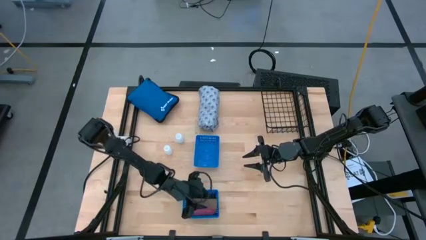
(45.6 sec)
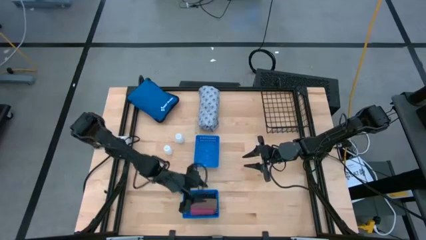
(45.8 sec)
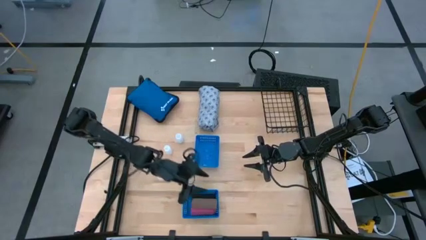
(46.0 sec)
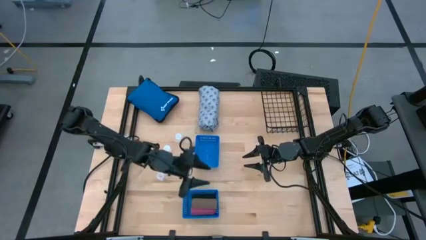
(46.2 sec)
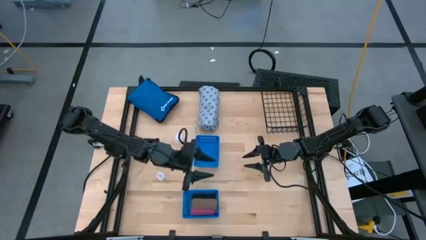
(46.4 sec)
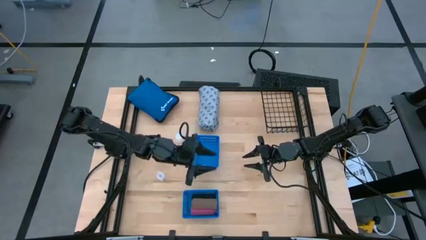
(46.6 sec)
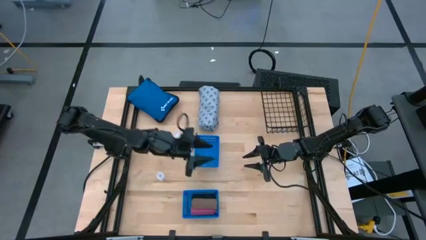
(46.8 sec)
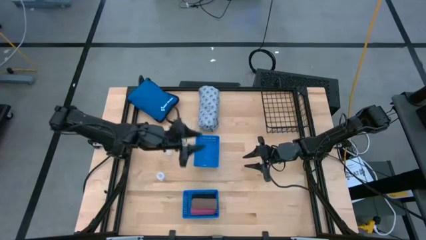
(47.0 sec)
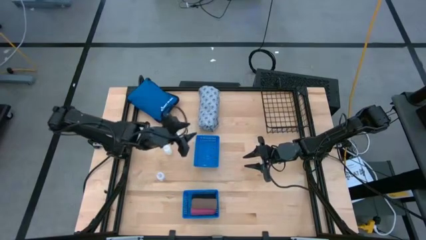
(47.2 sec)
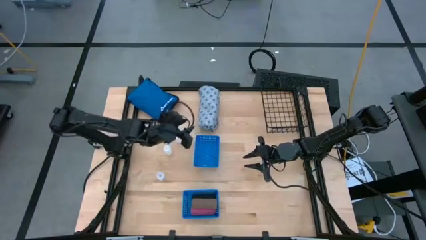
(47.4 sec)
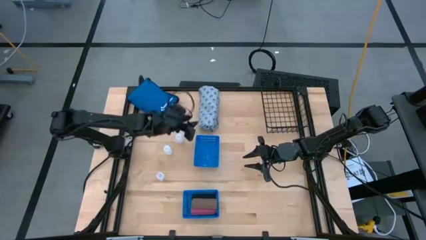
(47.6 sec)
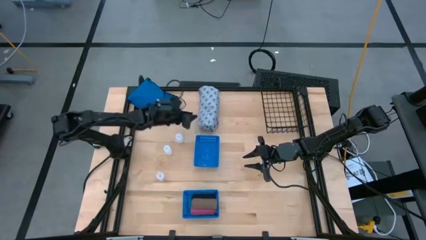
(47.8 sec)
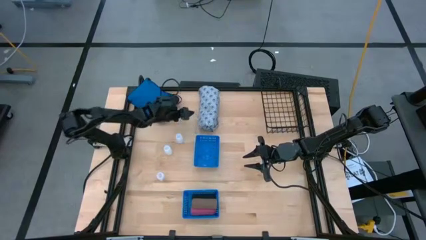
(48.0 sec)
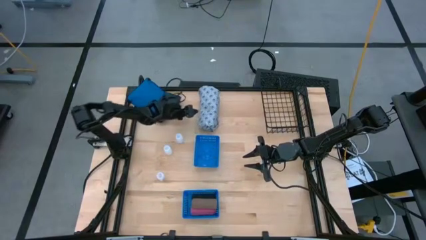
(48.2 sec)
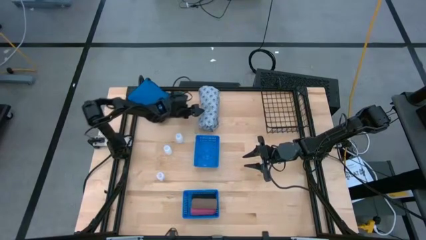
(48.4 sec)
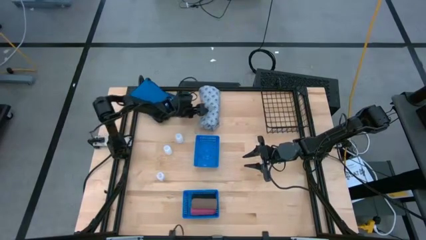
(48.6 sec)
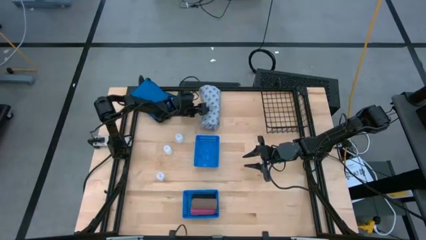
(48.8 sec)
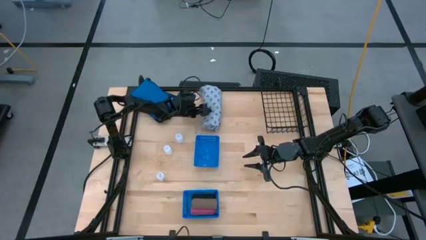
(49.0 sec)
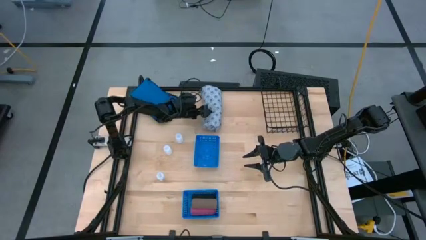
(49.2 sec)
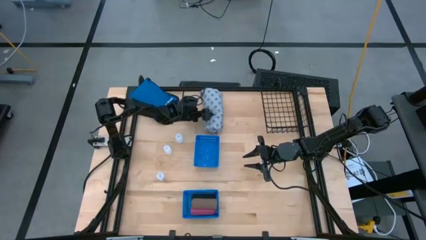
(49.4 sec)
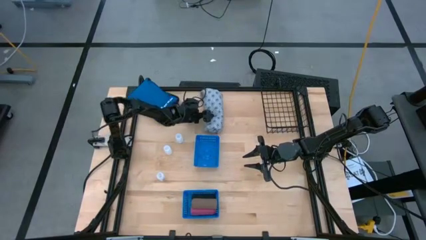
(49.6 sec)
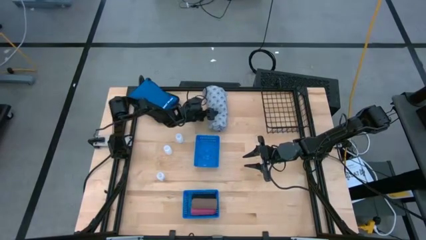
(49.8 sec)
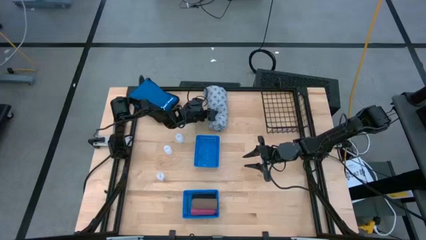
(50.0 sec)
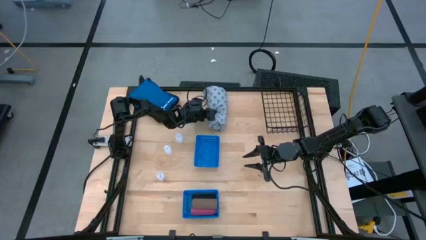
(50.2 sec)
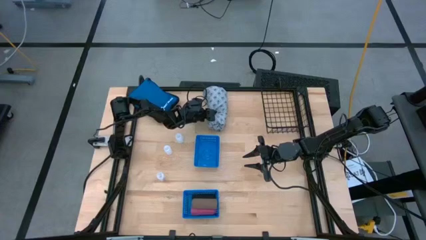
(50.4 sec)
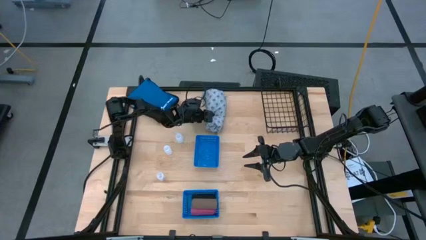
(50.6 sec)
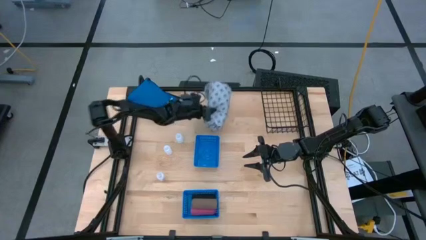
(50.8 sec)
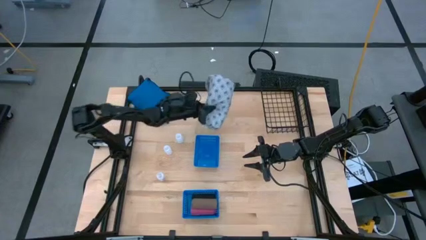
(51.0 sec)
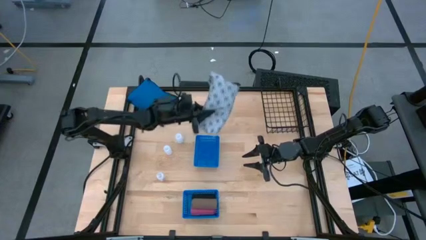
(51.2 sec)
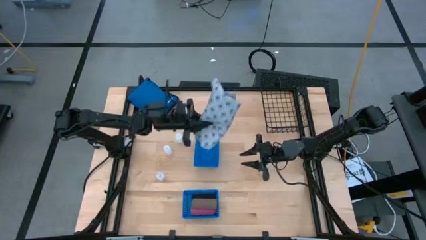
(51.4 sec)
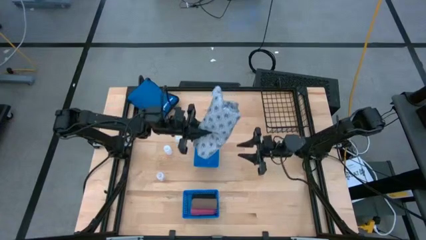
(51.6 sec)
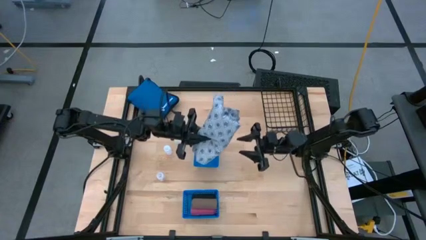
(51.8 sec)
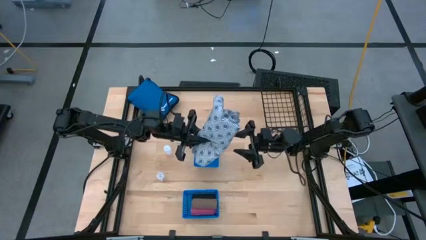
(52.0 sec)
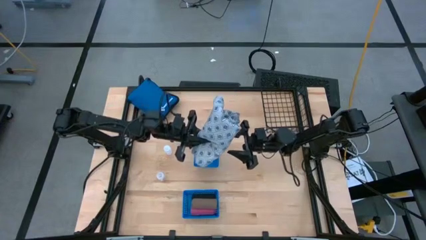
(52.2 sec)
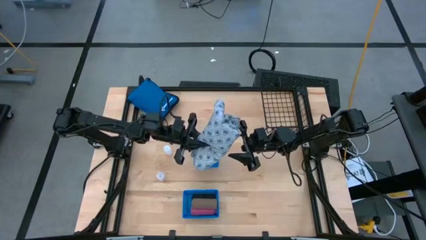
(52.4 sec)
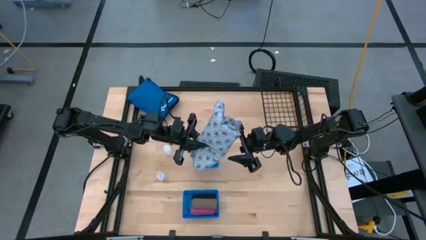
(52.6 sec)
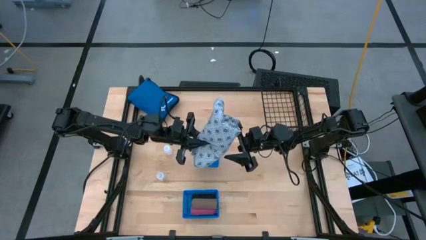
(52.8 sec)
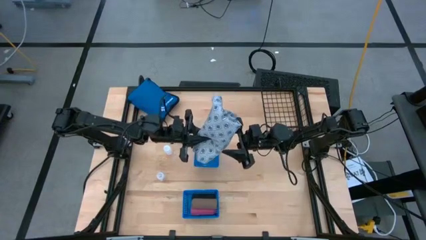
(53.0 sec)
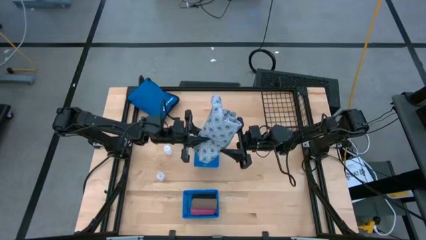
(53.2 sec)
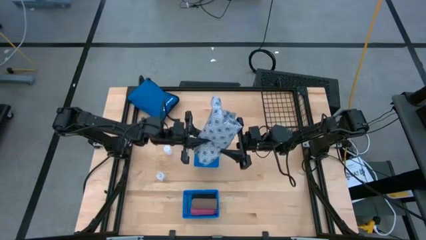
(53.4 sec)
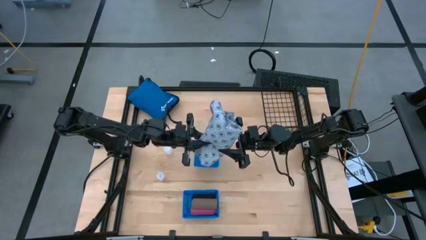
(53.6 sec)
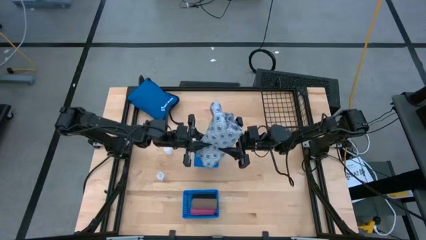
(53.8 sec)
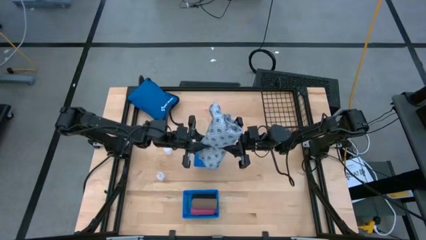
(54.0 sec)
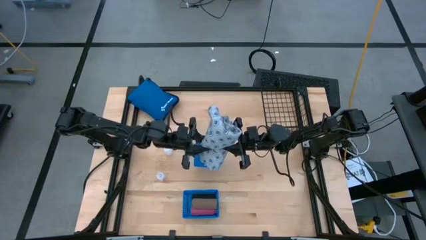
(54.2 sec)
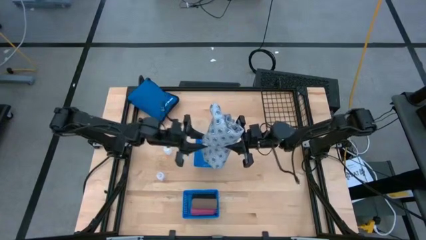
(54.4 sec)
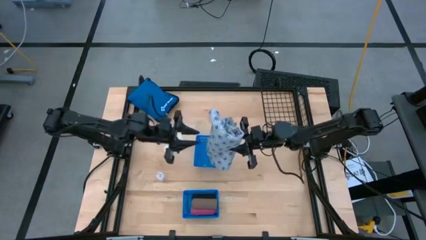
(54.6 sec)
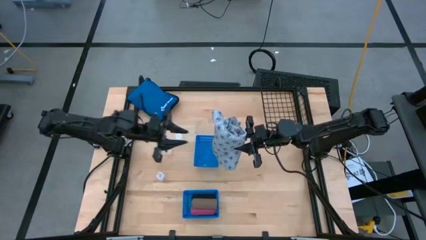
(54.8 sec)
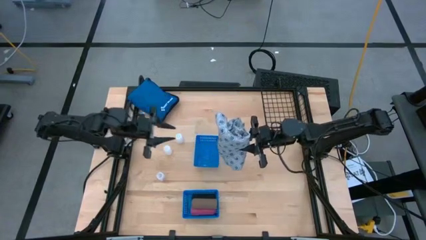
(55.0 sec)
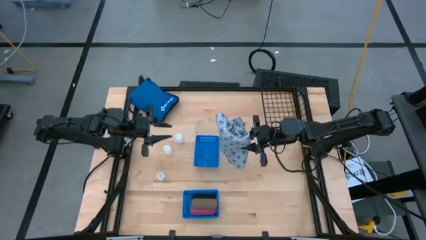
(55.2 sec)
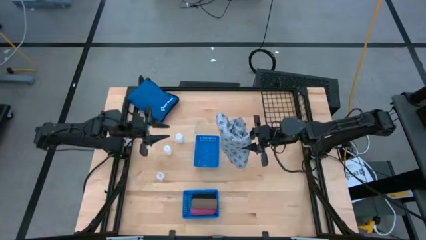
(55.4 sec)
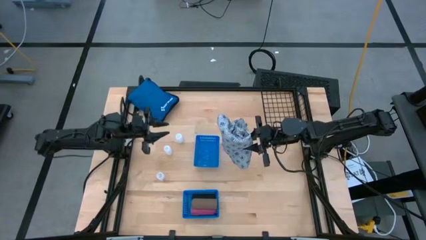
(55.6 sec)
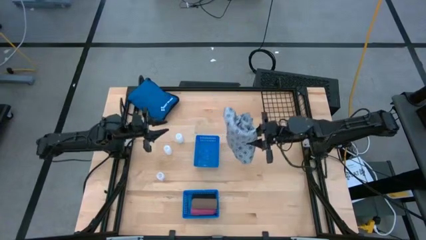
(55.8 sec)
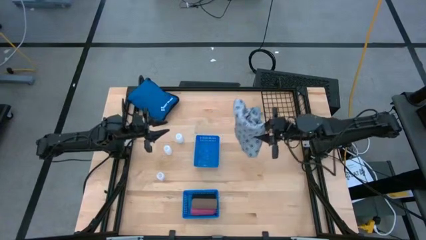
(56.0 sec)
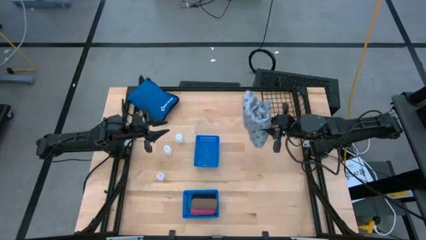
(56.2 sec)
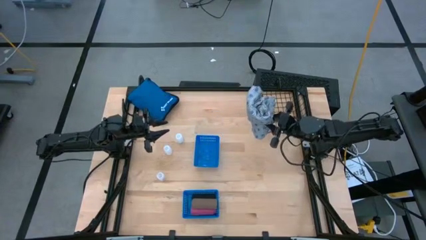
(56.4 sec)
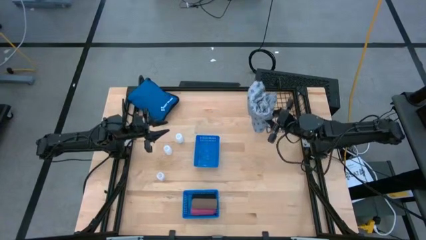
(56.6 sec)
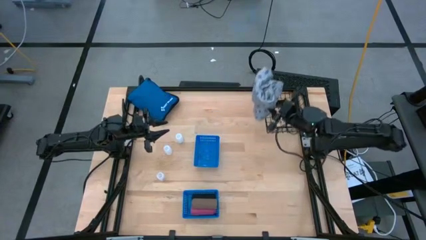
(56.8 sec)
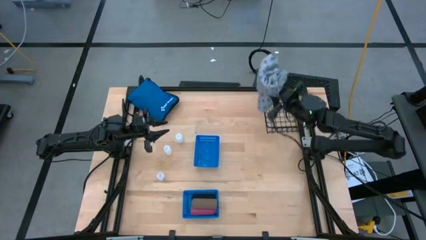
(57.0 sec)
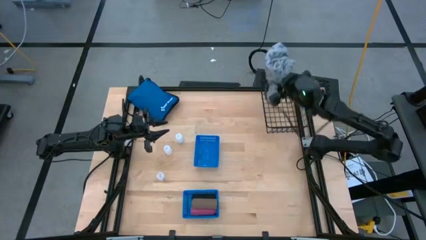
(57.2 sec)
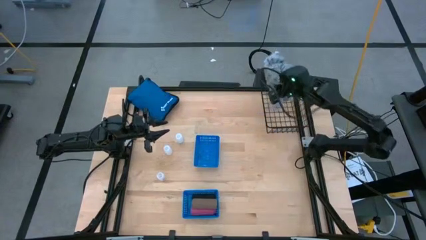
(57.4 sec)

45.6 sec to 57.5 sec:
Task: Pick & place medical supplies in basket/bin
Put the blue patient gown into the black wire basket

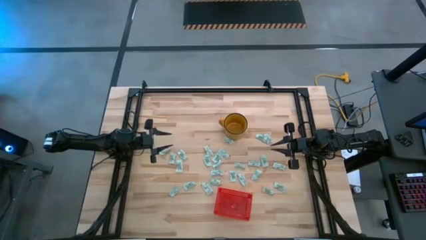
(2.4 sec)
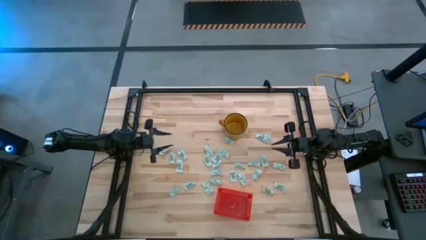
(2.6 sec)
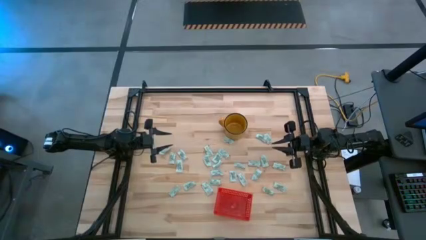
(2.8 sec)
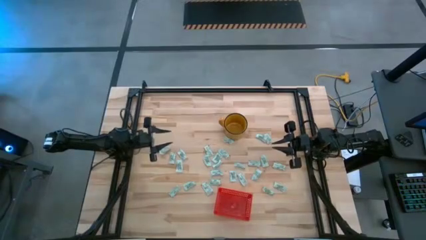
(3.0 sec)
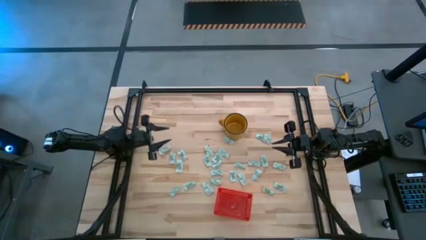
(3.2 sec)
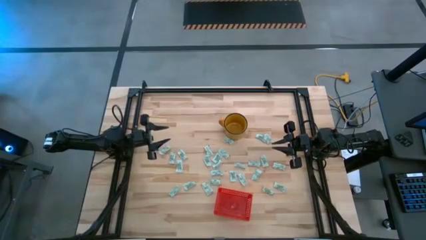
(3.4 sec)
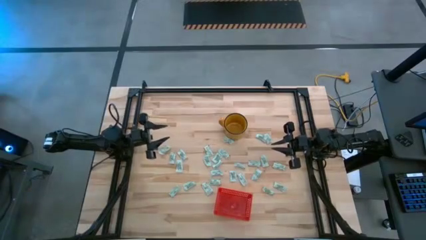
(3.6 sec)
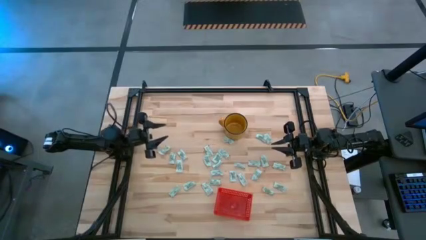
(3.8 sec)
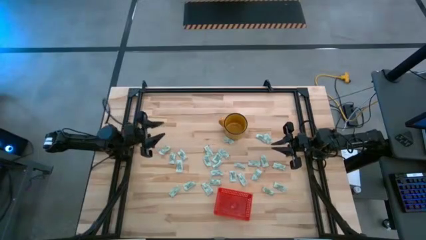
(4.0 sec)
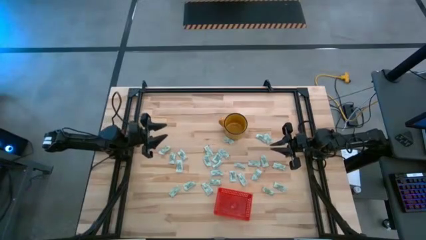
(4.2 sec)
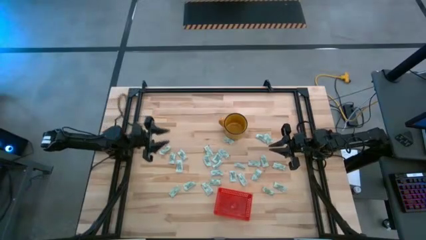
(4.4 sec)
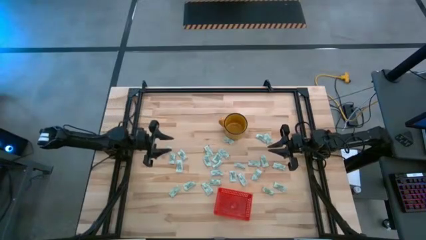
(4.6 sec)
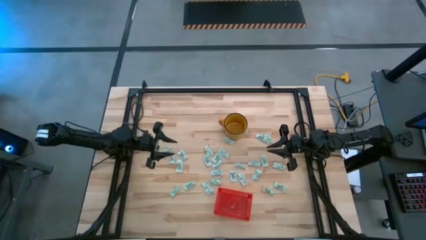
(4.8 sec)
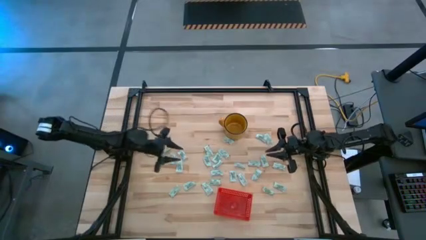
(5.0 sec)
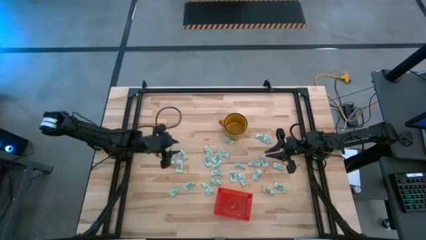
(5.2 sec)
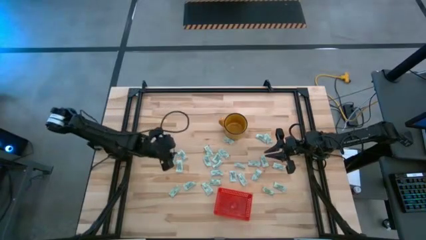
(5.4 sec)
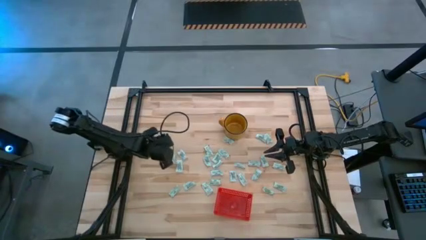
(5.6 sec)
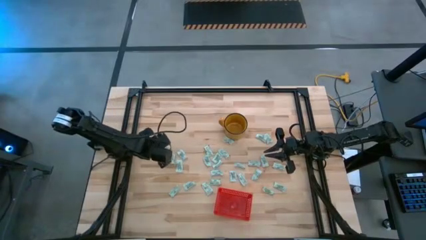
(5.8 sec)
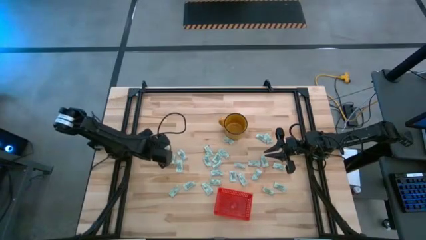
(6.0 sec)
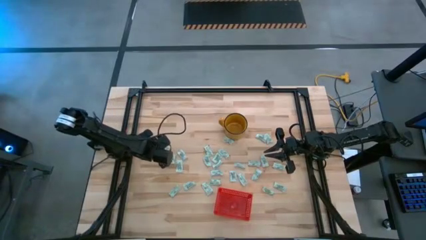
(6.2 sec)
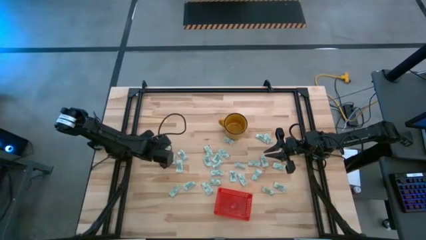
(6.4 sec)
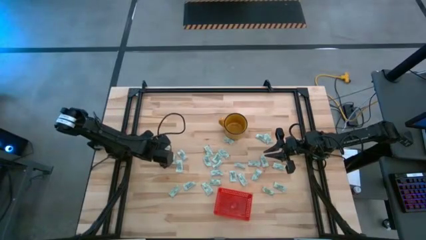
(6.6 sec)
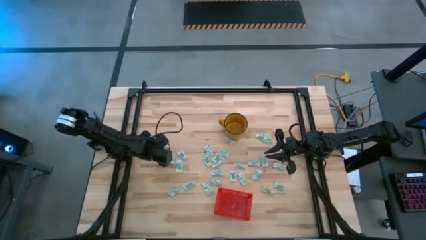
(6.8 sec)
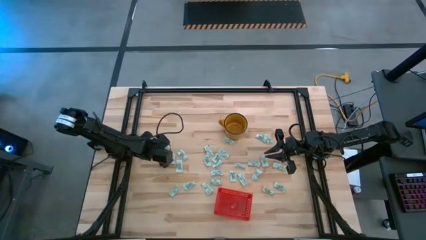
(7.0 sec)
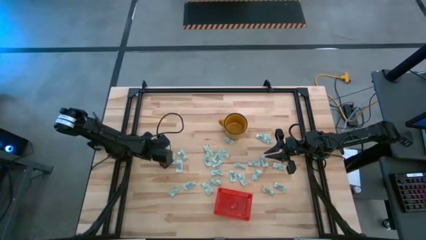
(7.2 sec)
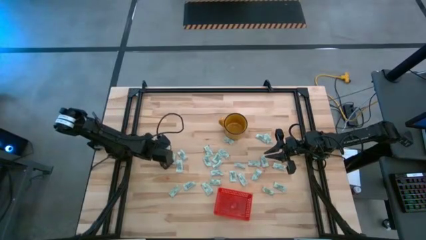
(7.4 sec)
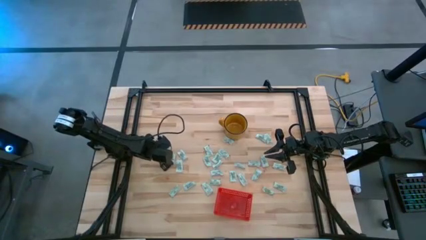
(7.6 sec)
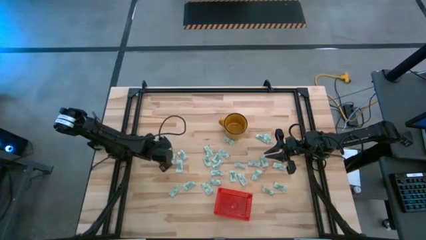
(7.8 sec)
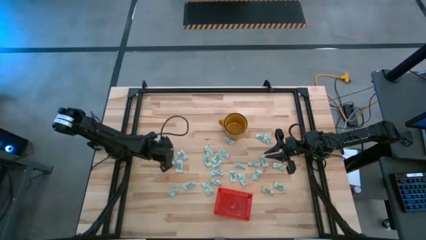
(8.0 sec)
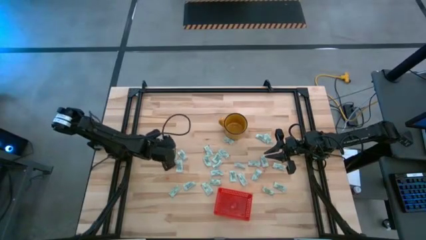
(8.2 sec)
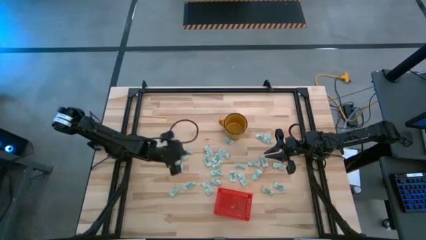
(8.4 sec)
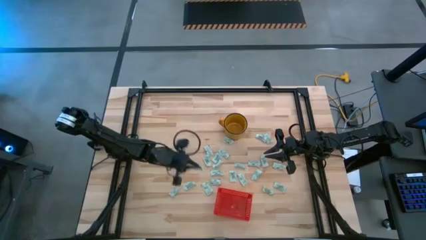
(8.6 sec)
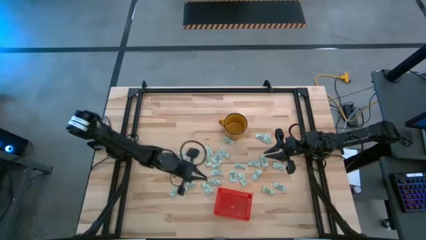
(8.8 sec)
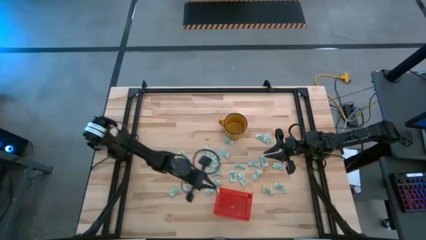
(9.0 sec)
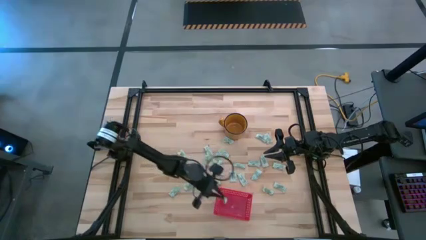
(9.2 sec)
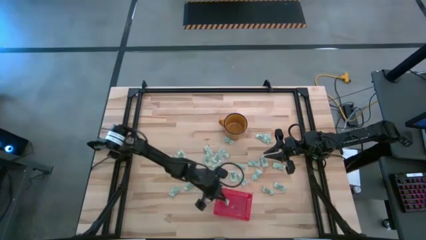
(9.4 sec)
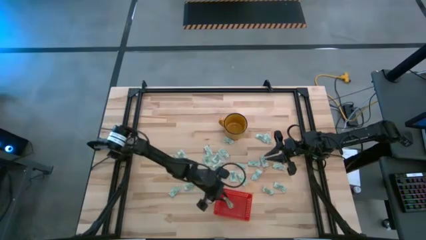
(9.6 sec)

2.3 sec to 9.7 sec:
Task: Pick and place Stevia / Truvia into bins
Put the stevia packet into the bin
